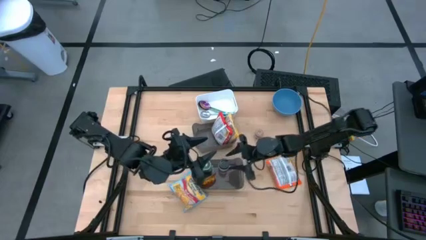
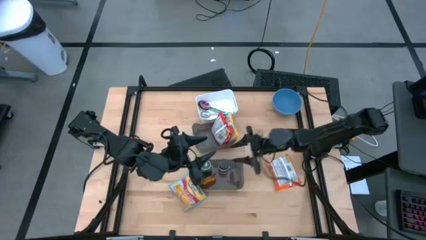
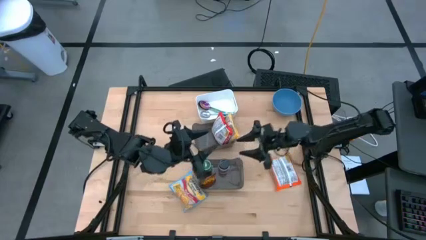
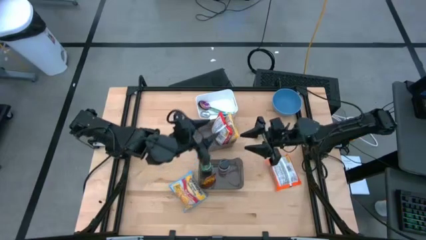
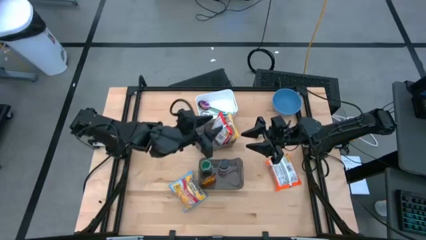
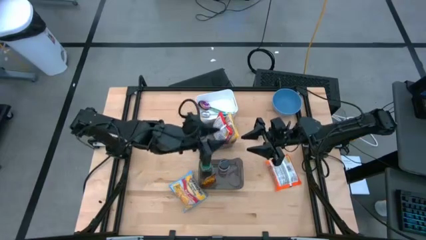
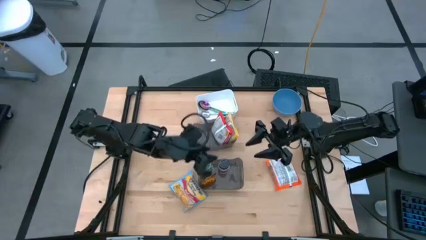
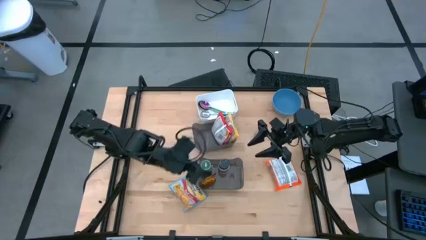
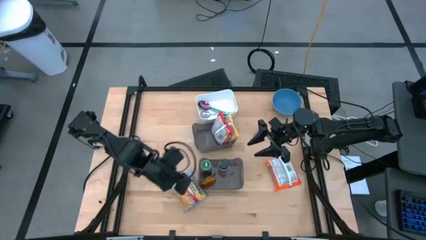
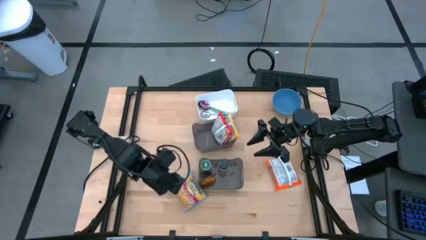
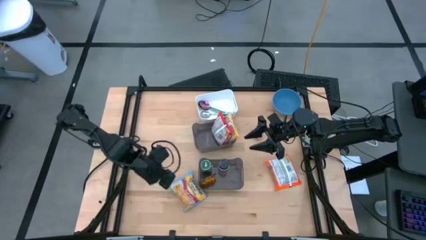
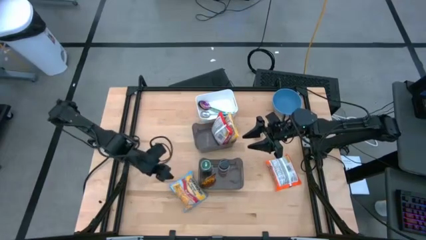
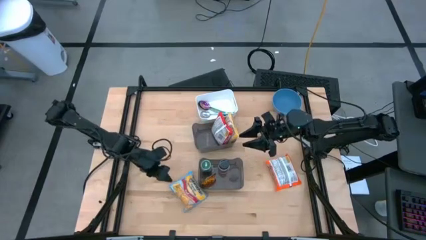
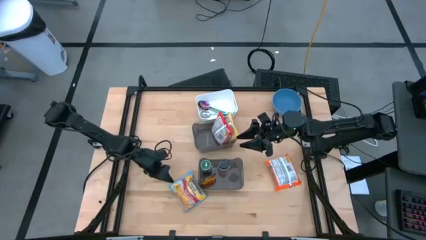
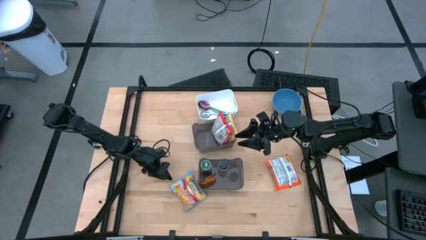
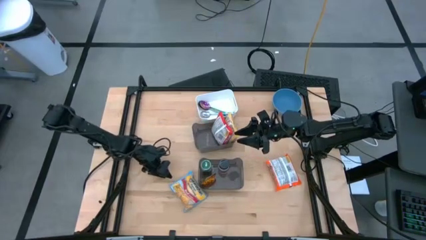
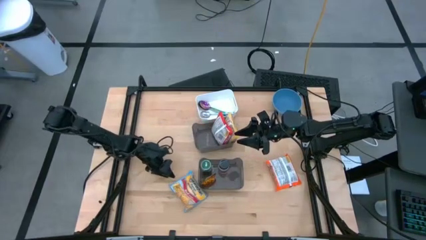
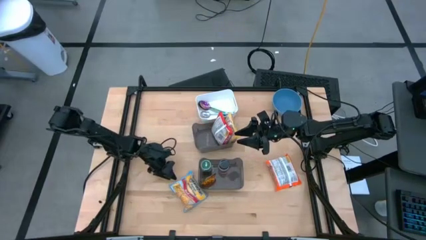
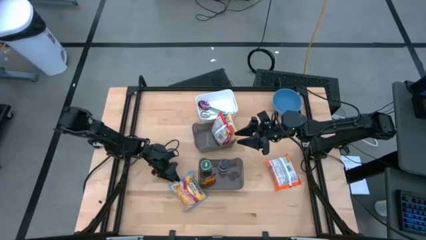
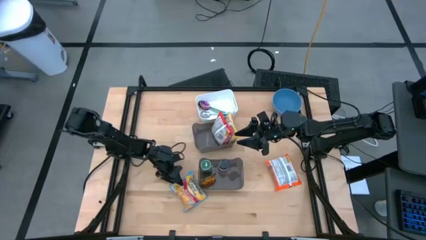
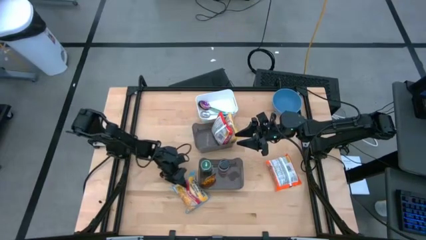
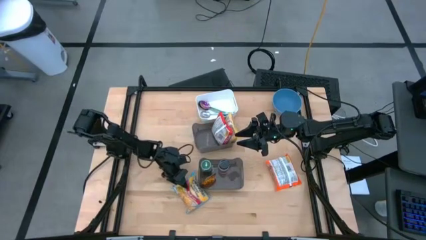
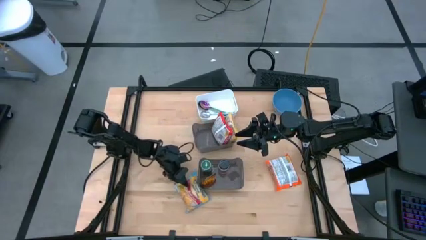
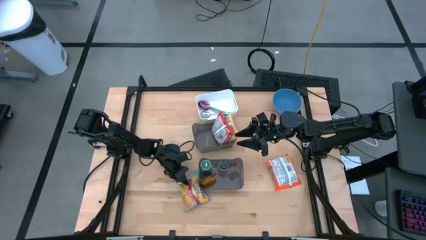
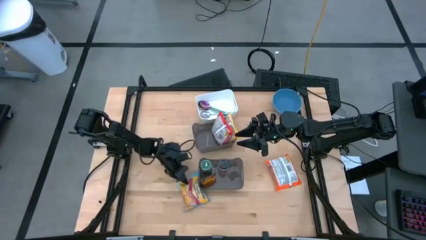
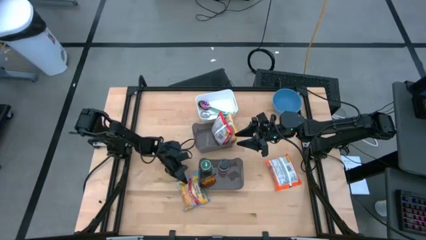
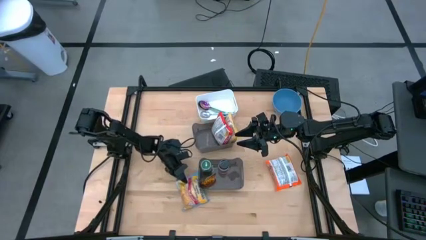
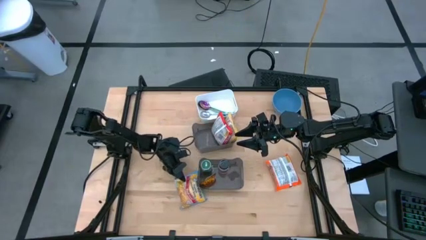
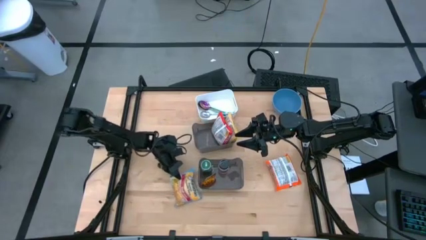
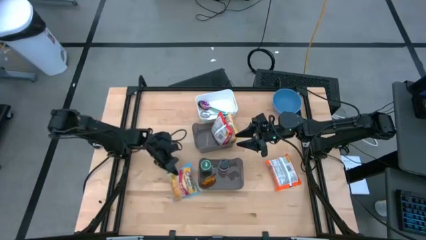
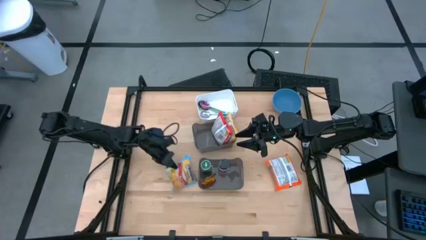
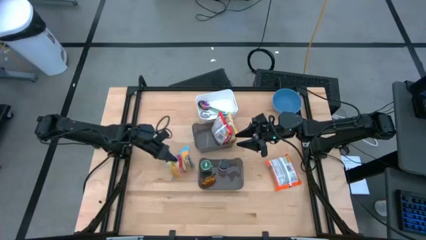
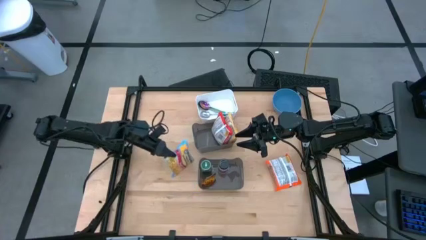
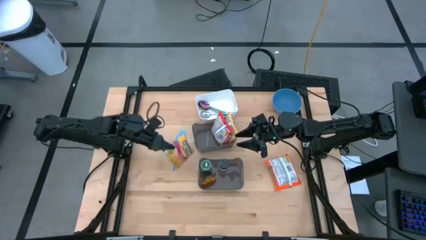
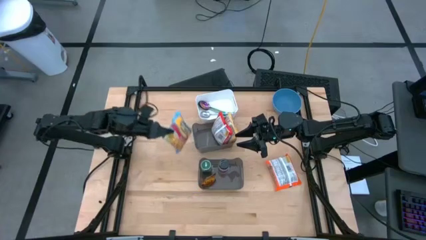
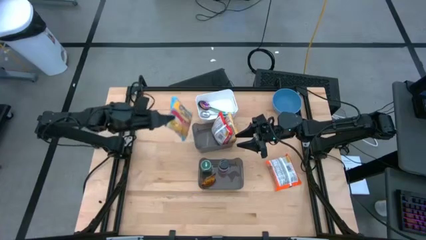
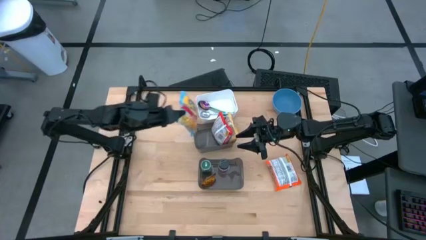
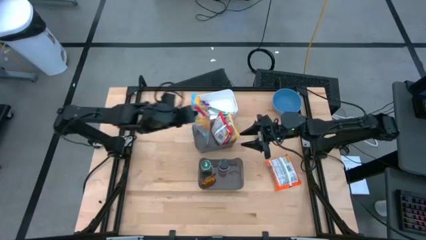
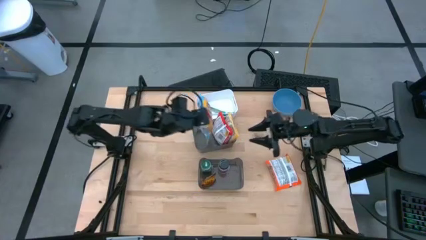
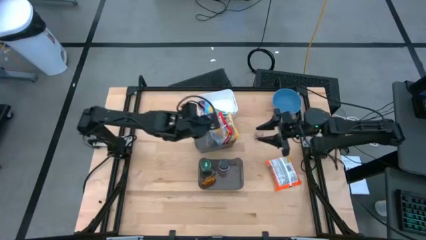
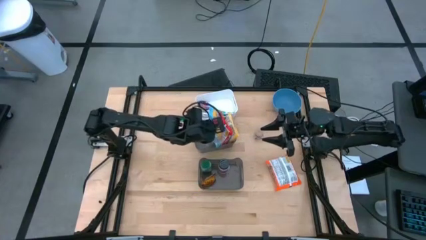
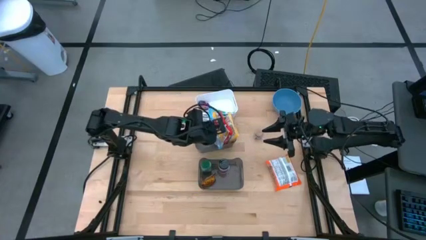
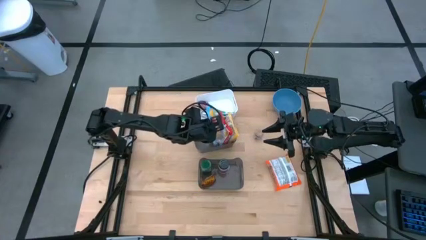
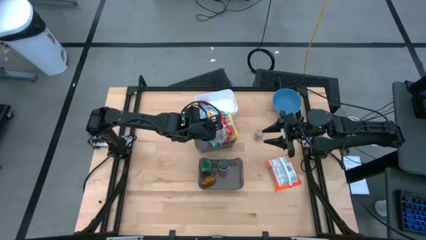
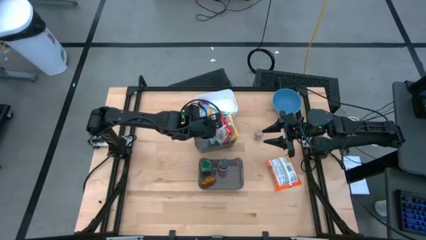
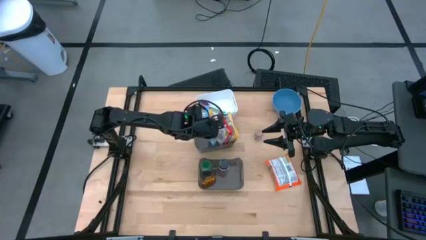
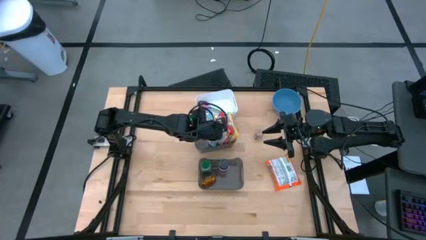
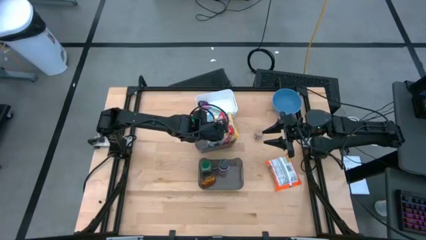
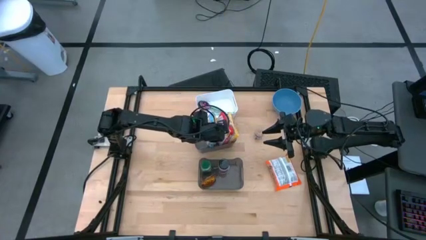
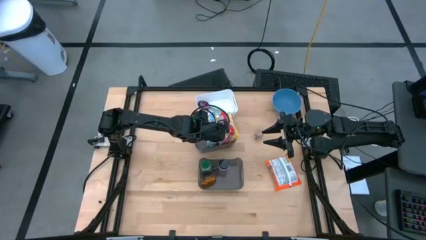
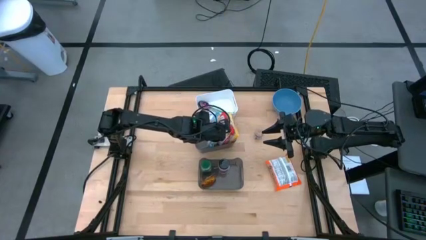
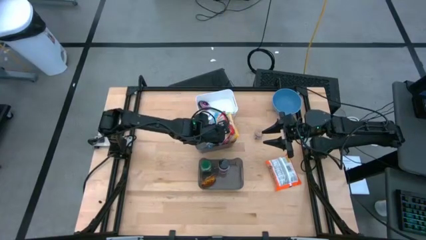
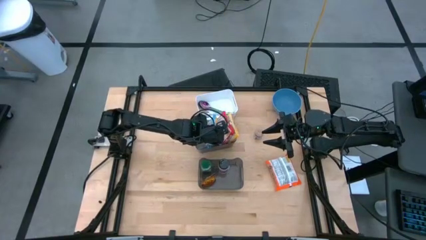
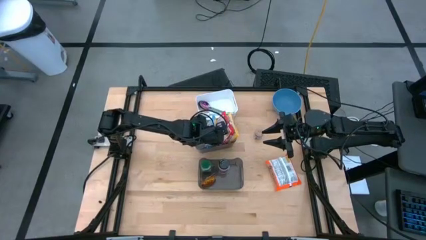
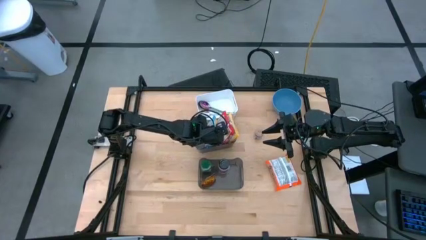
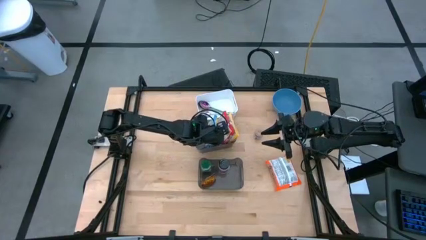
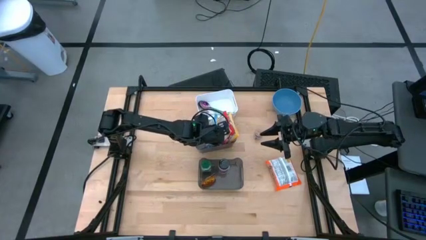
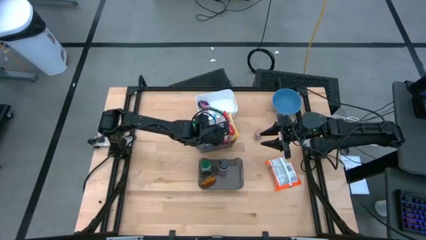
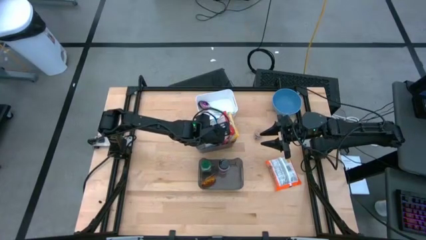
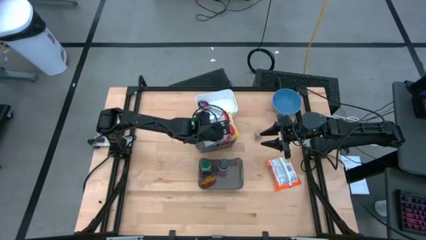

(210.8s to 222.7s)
Task: Pick & Place Food Item
Put the blue noodle pack into the top black bin
